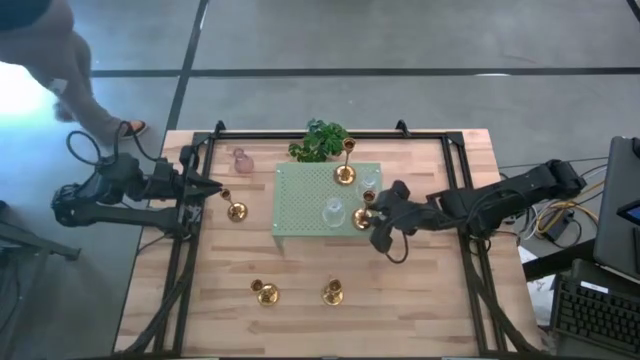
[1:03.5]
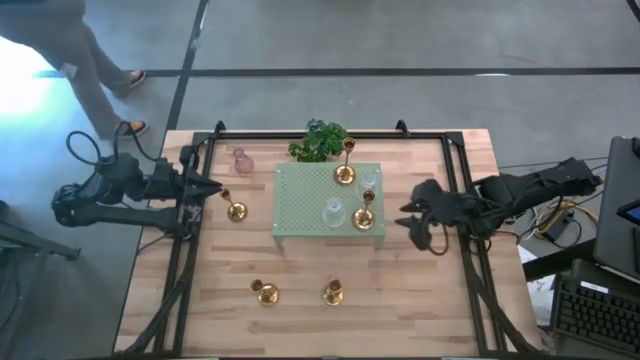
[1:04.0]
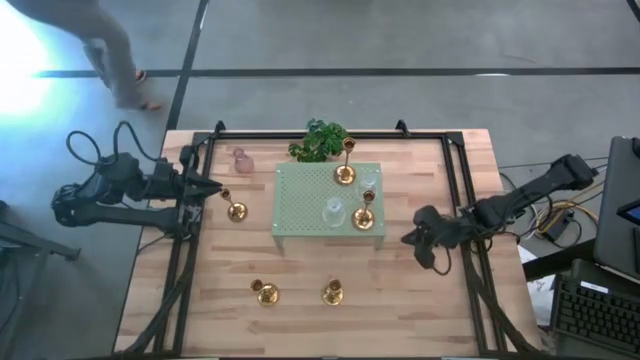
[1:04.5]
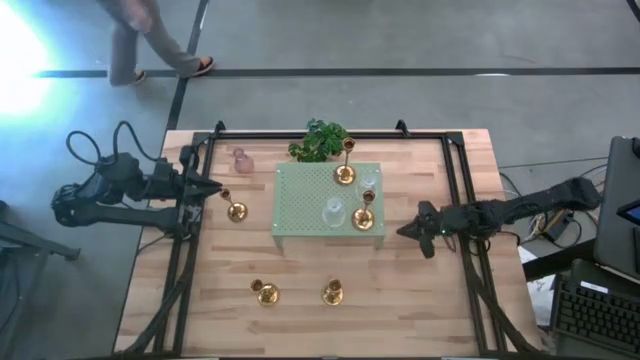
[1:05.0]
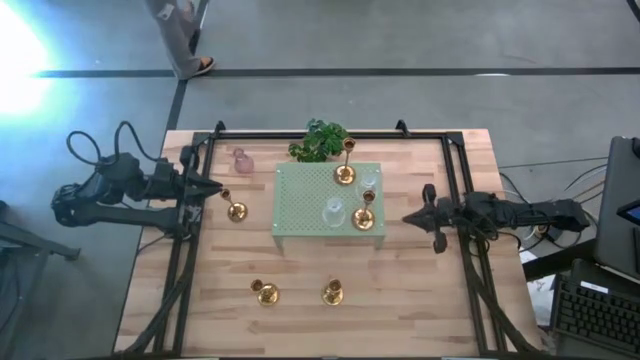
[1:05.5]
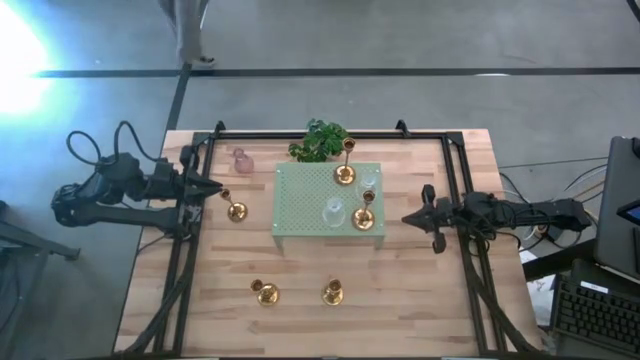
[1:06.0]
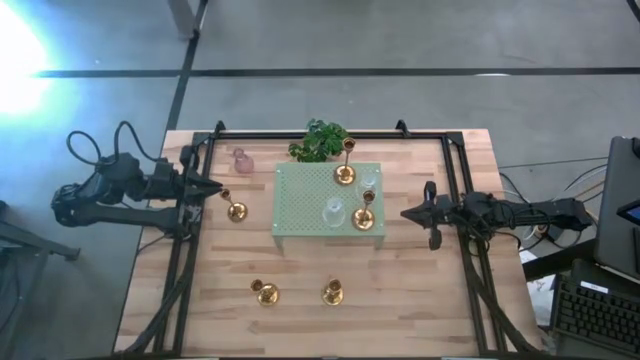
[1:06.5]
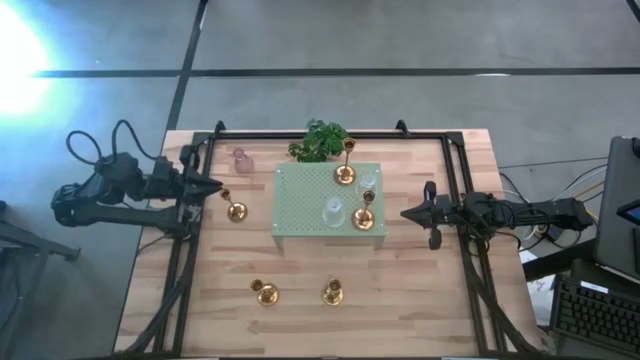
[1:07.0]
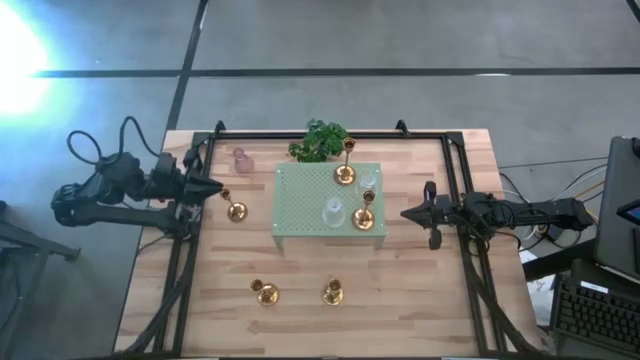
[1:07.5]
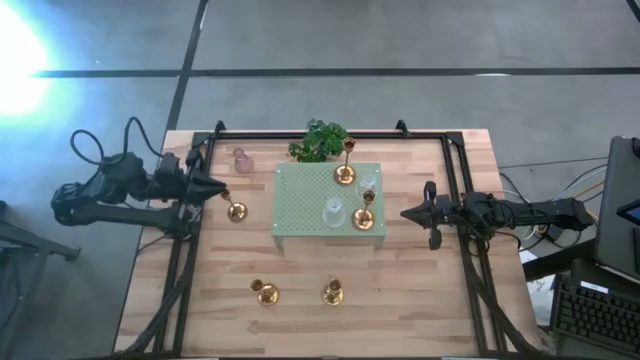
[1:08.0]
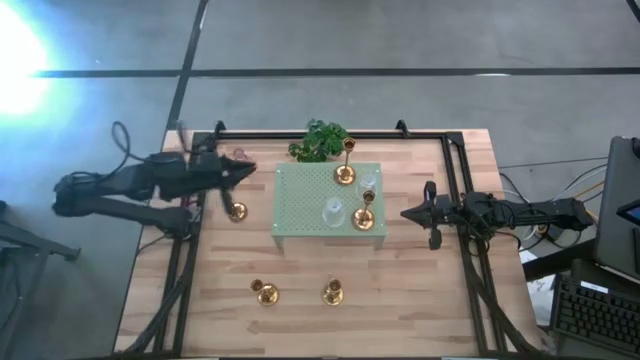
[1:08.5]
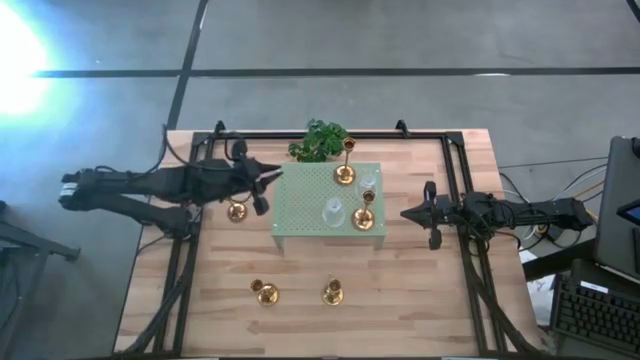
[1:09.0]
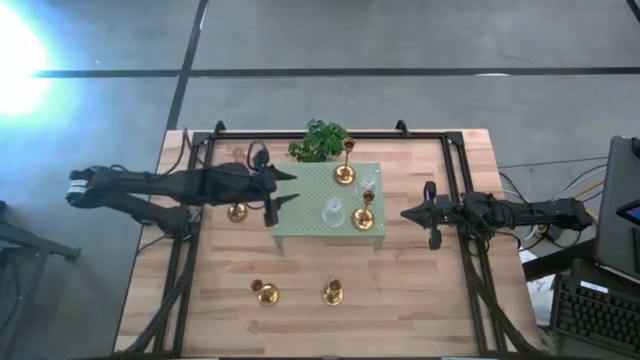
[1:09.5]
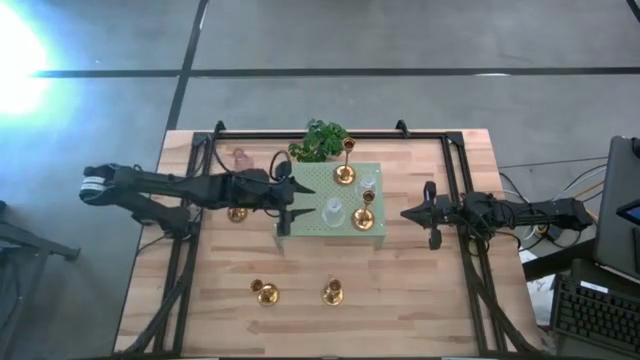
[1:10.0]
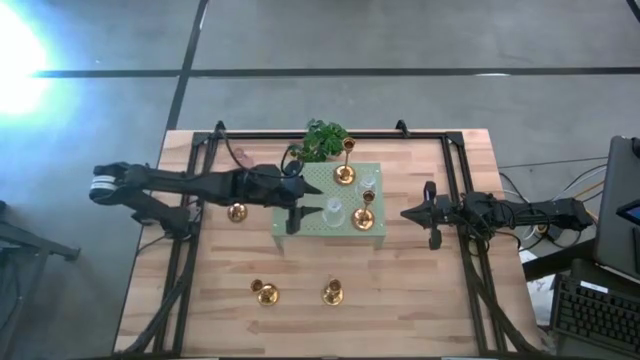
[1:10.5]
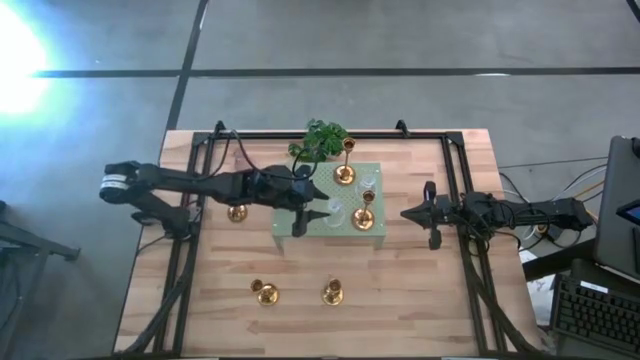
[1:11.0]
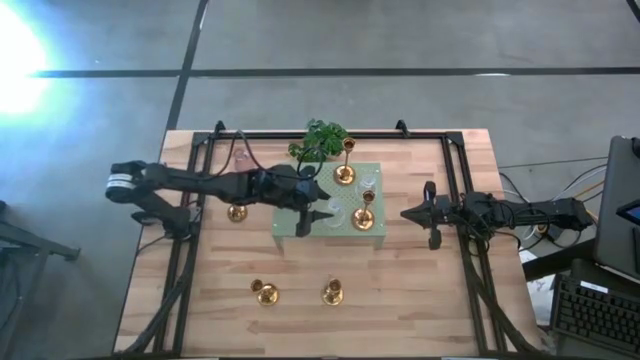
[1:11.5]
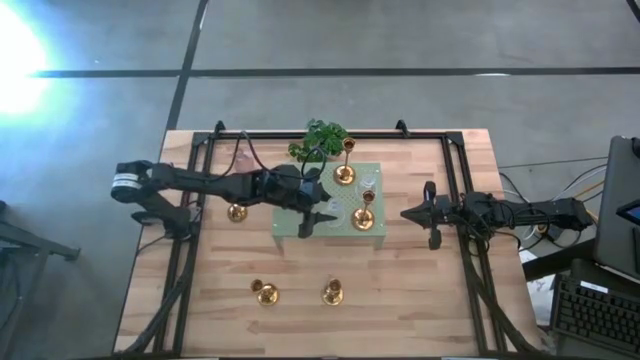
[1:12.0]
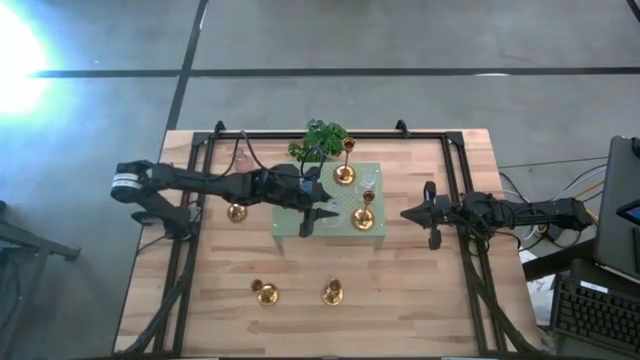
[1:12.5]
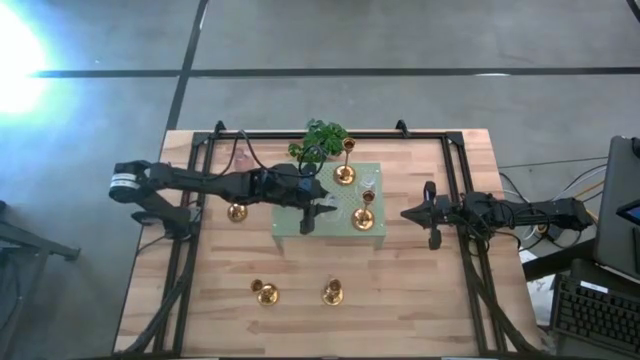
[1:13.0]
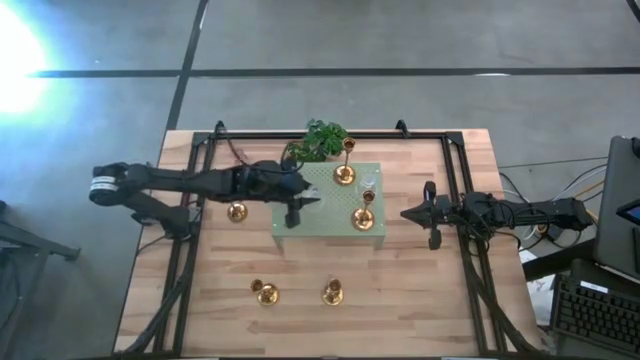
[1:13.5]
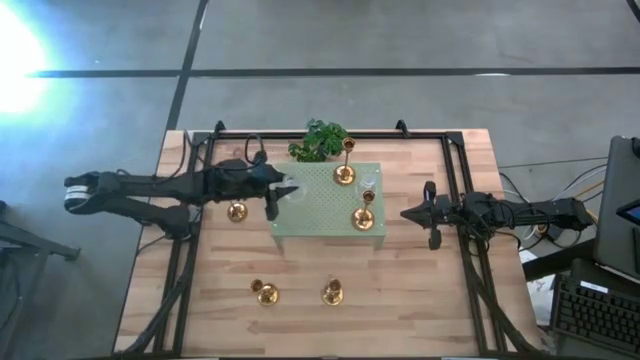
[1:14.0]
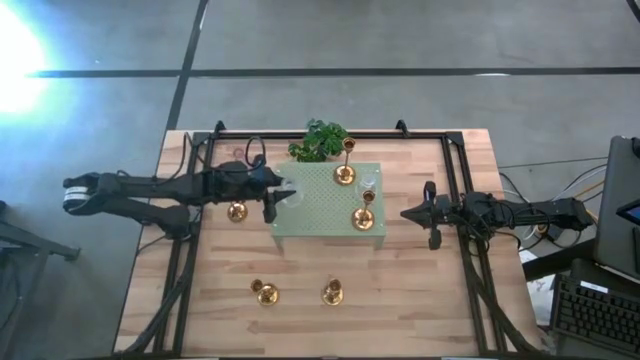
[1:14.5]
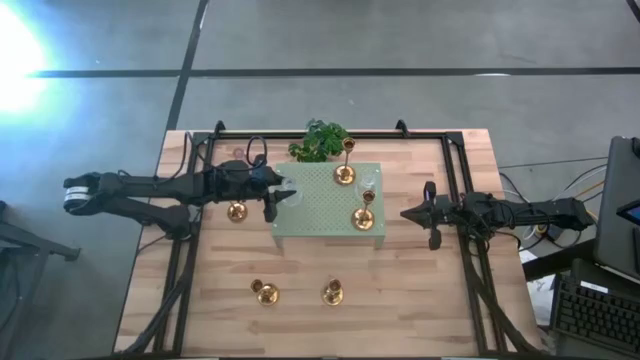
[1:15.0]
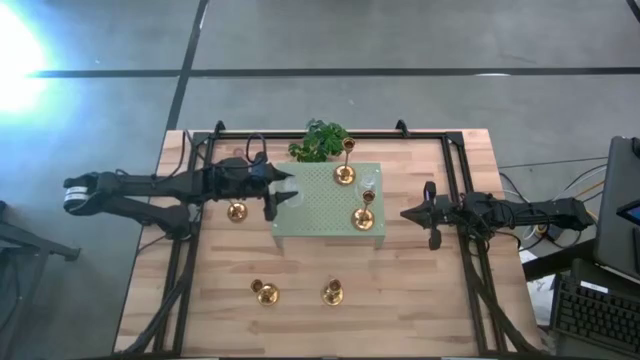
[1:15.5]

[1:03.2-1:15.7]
Task: Pick & Place candle stick holders
Move the transparent candle holder to the middle left on the shelf

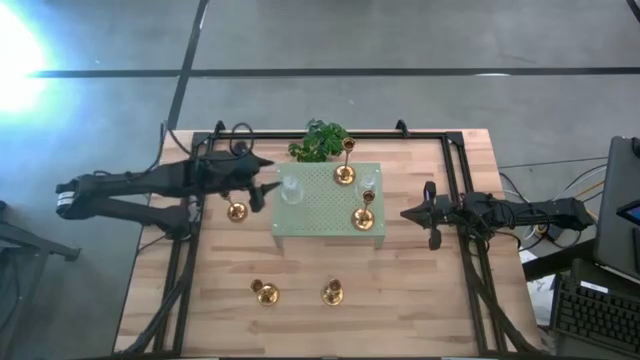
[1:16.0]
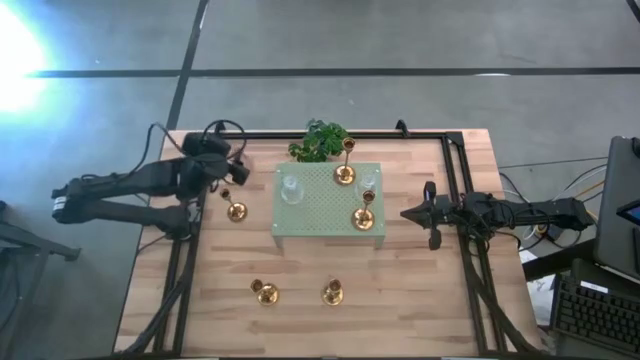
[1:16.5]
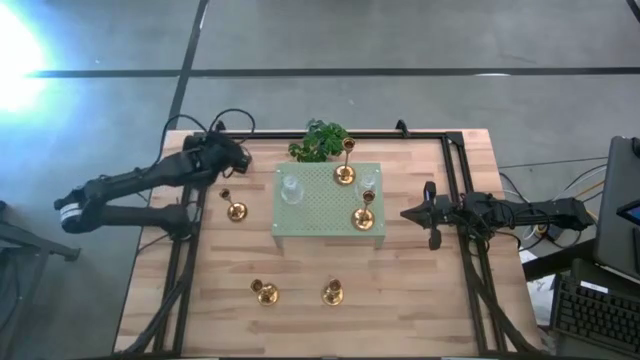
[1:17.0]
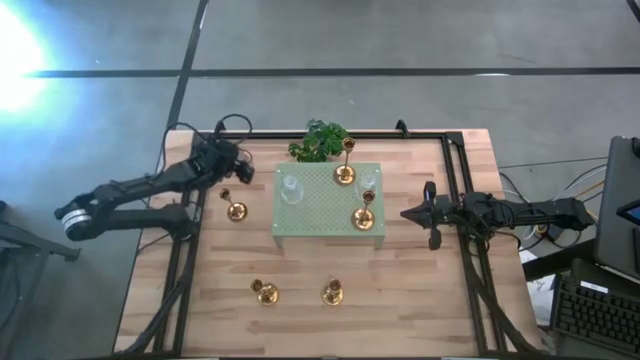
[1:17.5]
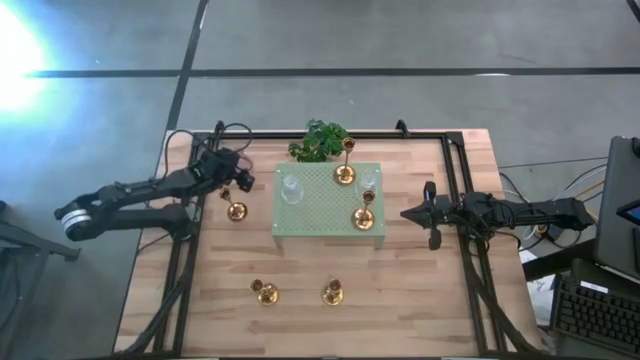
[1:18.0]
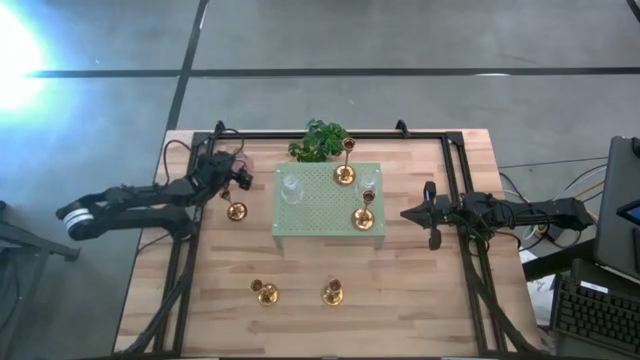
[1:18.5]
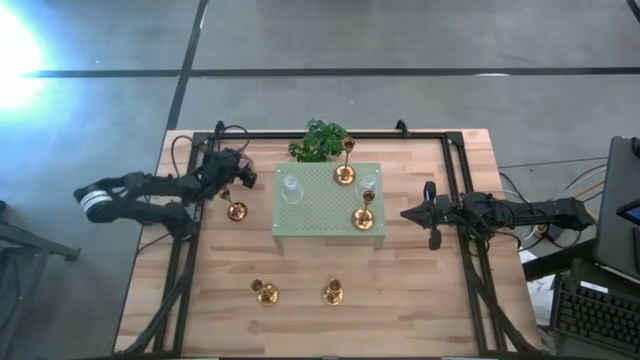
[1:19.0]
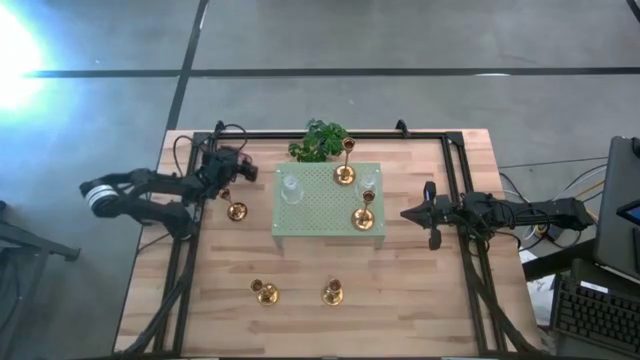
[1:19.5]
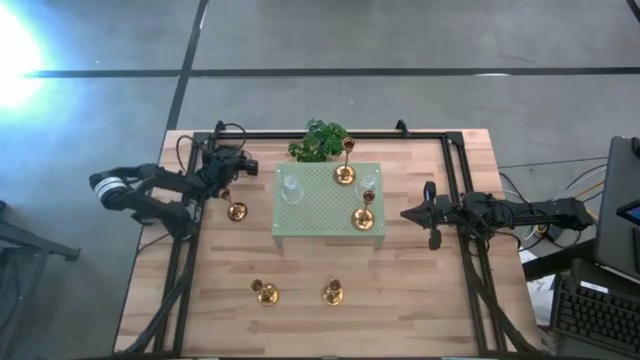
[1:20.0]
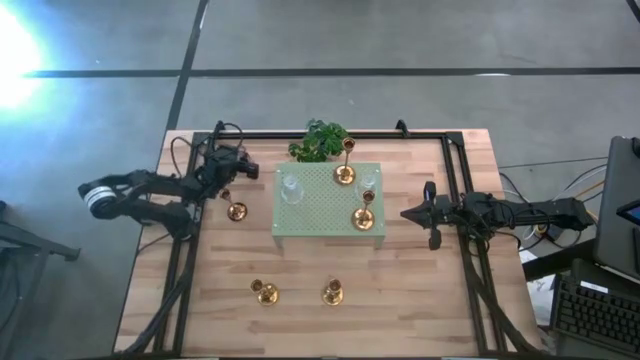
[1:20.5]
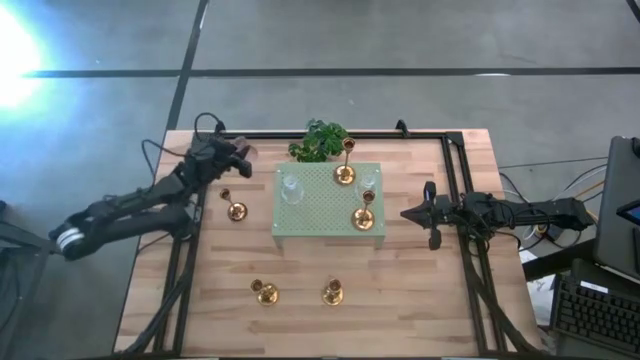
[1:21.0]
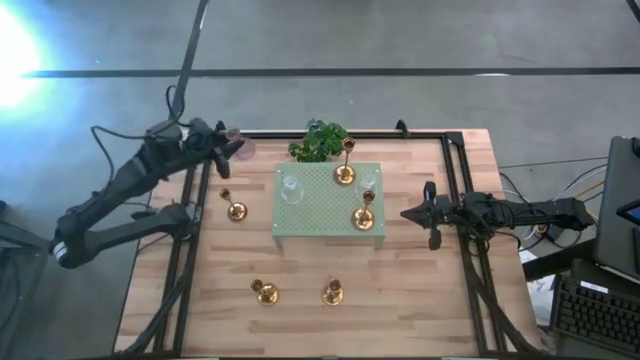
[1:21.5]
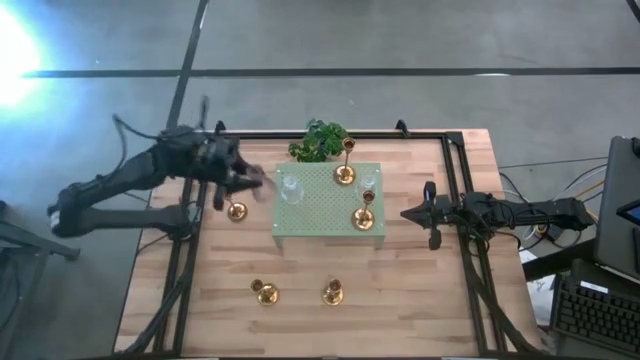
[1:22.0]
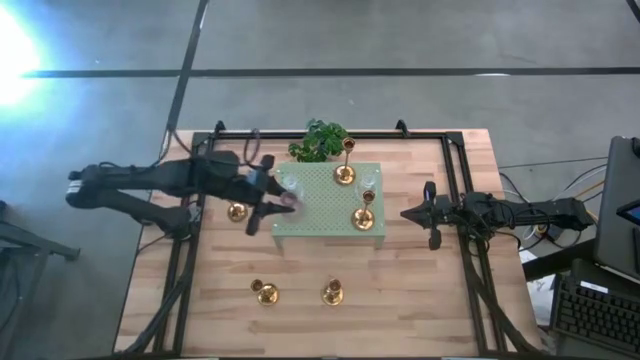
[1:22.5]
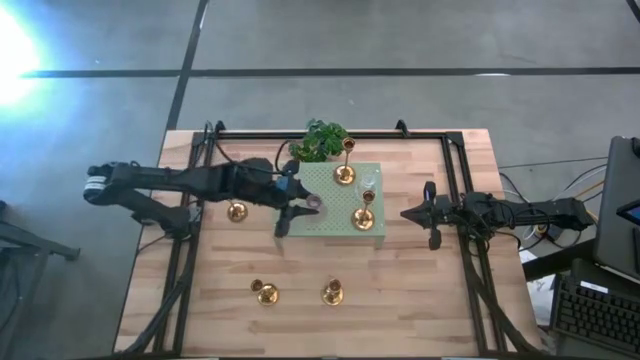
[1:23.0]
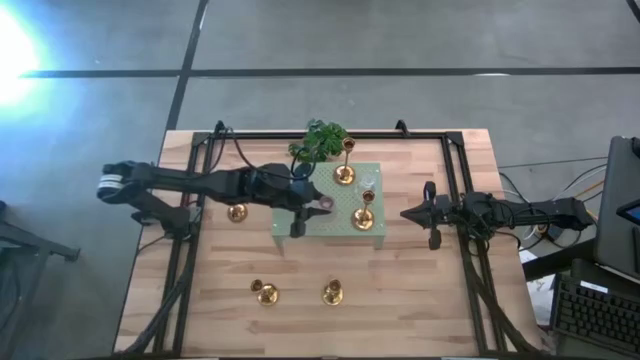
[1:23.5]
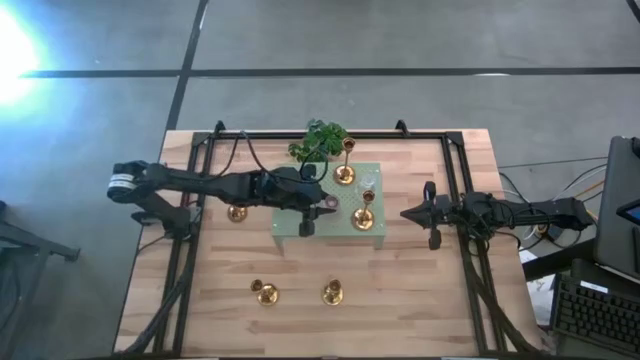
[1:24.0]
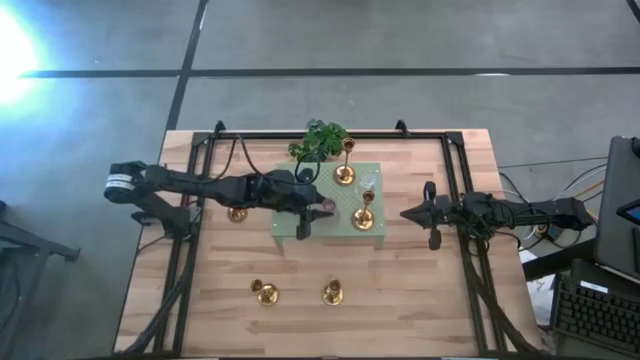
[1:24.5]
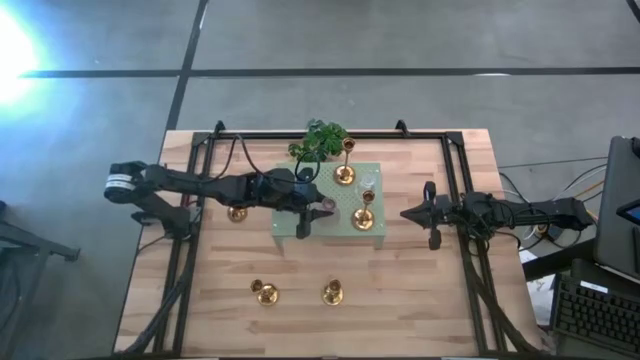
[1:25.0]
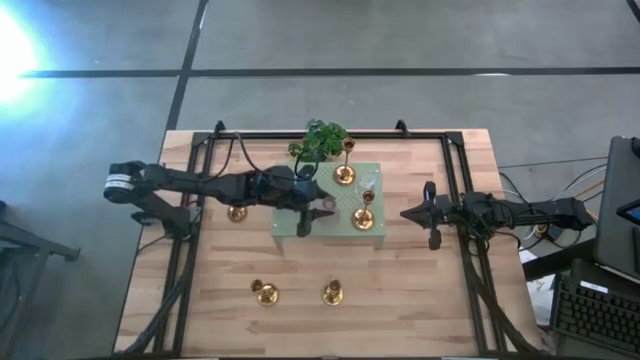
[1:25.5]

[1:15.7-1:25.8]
Put the pink candle holder on the shelf
